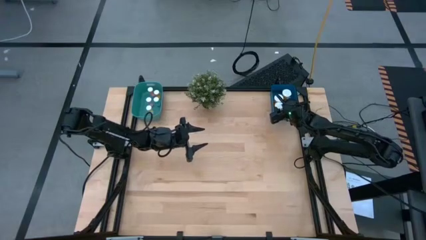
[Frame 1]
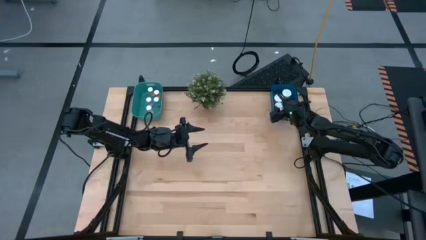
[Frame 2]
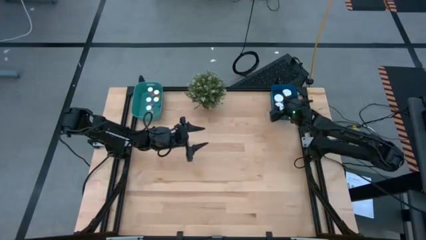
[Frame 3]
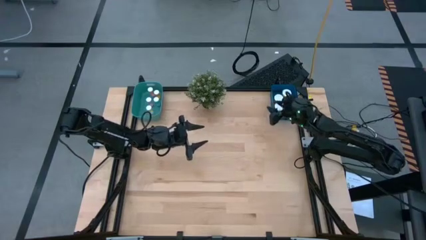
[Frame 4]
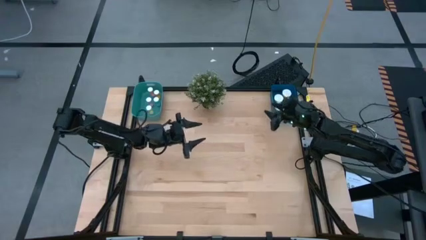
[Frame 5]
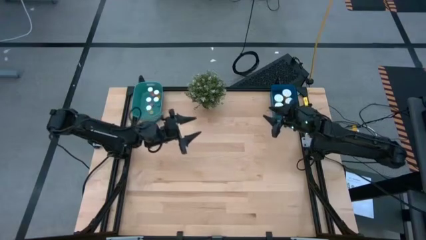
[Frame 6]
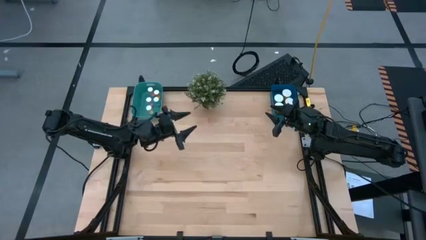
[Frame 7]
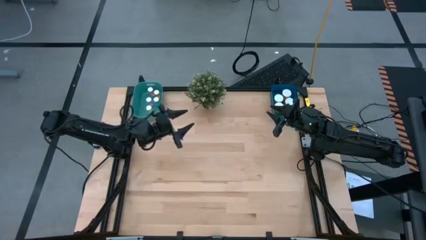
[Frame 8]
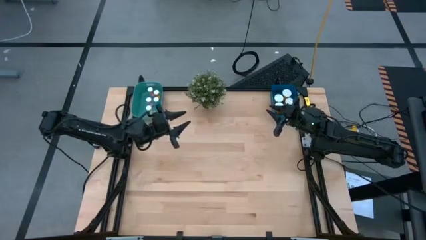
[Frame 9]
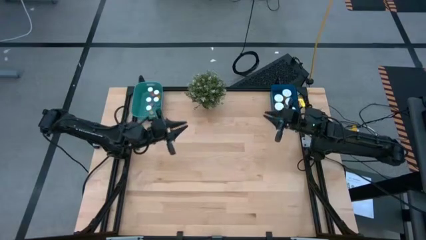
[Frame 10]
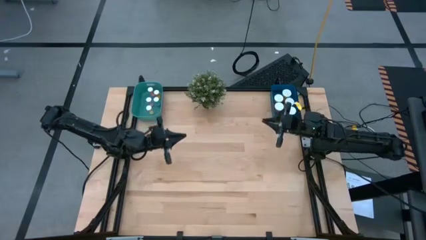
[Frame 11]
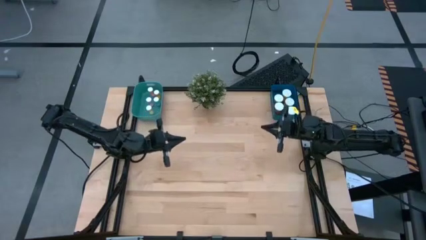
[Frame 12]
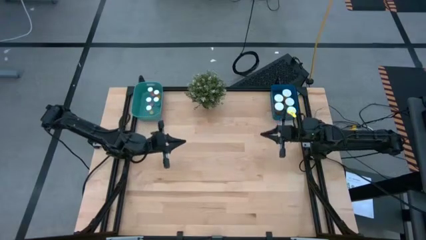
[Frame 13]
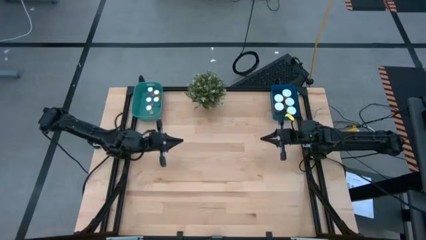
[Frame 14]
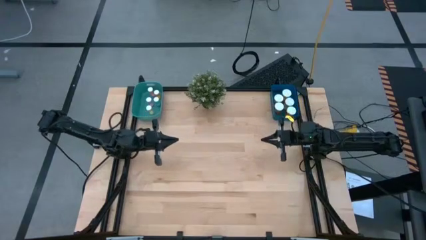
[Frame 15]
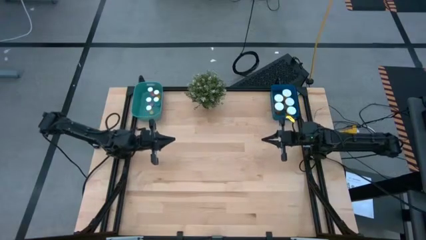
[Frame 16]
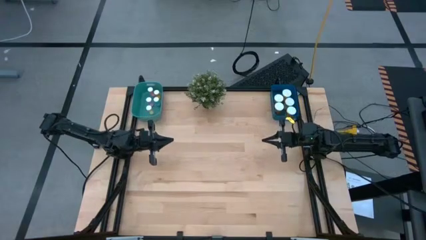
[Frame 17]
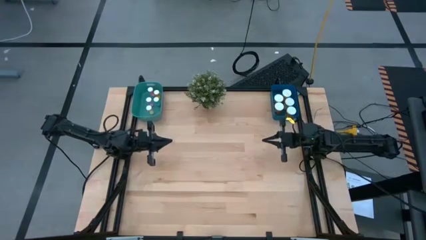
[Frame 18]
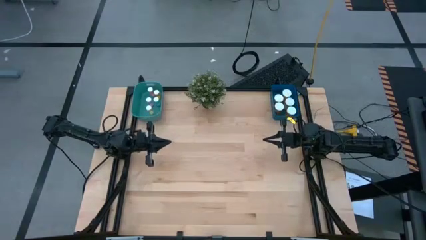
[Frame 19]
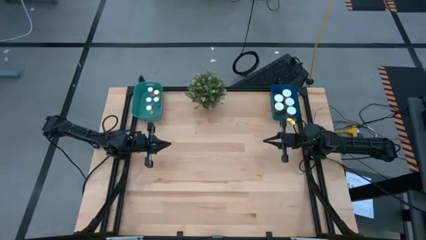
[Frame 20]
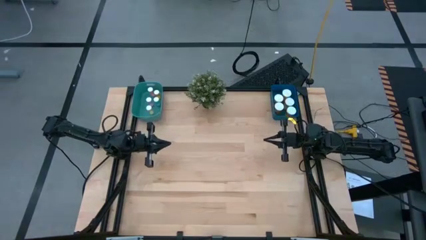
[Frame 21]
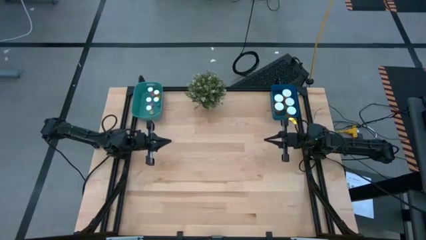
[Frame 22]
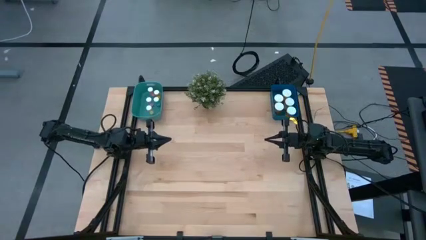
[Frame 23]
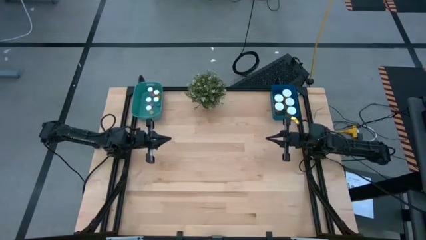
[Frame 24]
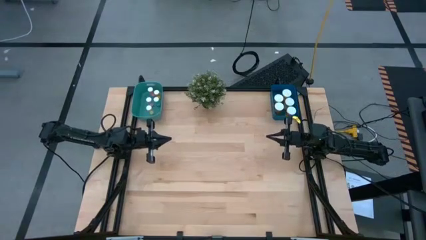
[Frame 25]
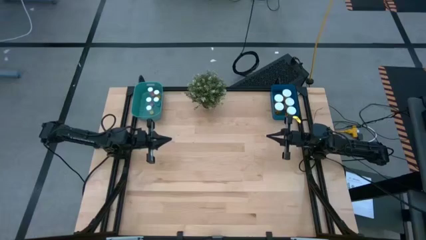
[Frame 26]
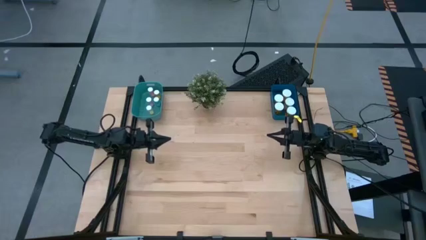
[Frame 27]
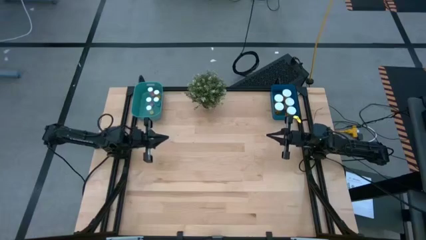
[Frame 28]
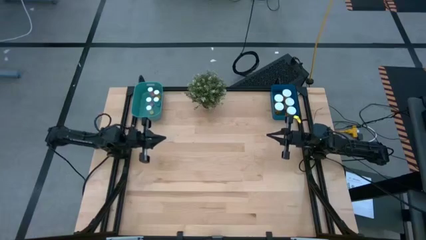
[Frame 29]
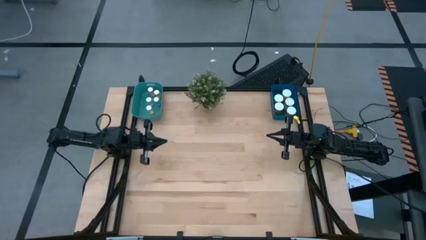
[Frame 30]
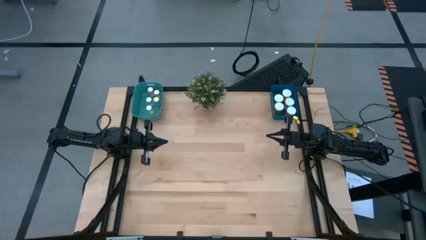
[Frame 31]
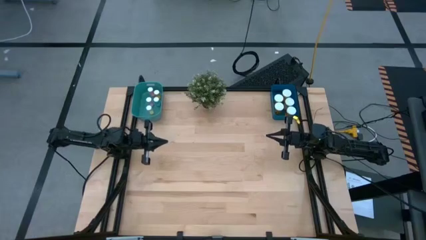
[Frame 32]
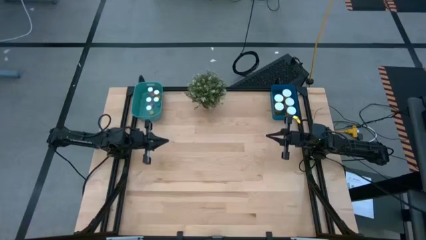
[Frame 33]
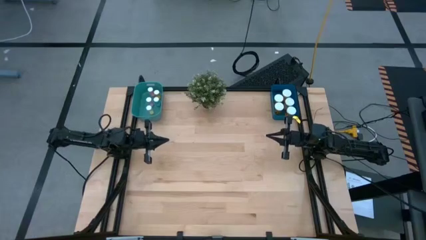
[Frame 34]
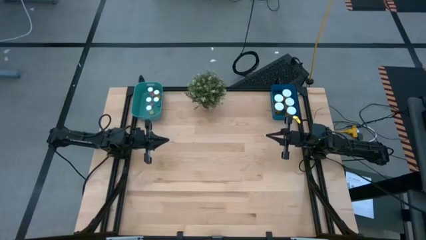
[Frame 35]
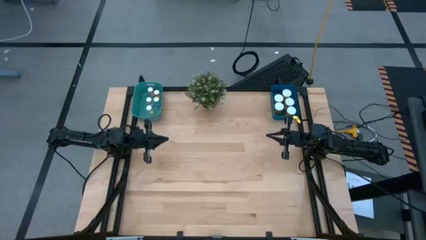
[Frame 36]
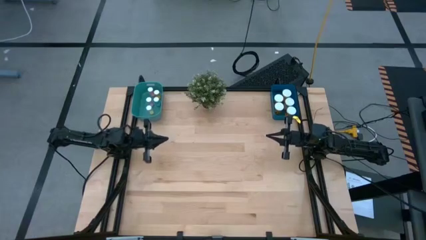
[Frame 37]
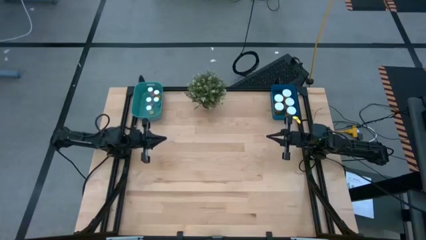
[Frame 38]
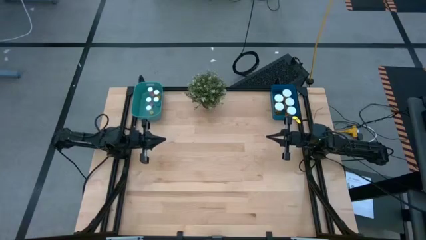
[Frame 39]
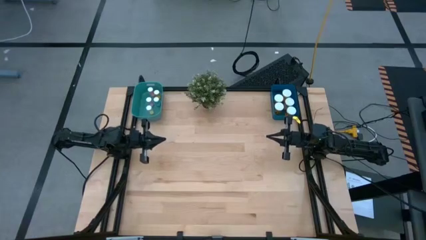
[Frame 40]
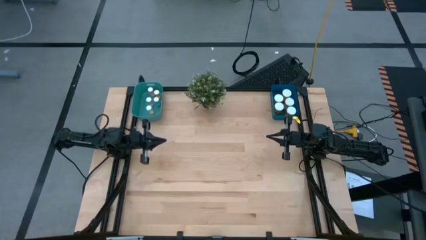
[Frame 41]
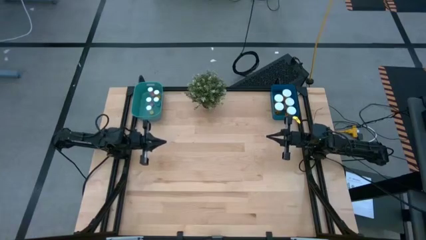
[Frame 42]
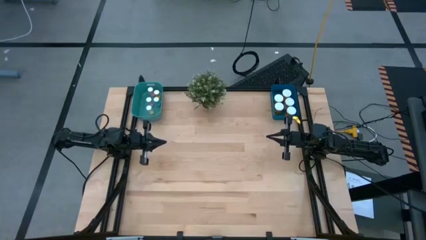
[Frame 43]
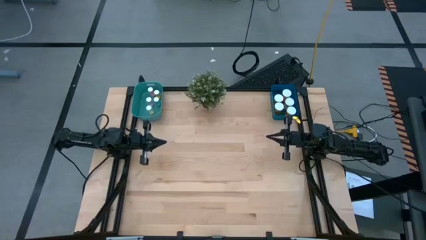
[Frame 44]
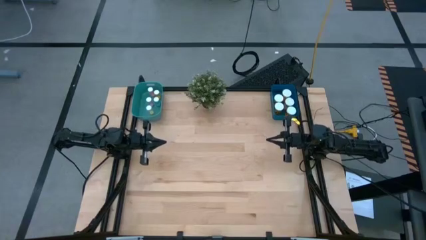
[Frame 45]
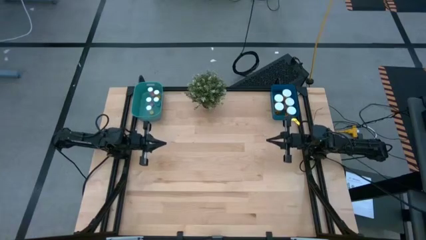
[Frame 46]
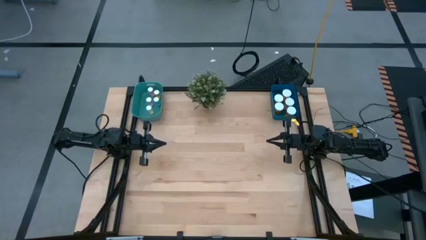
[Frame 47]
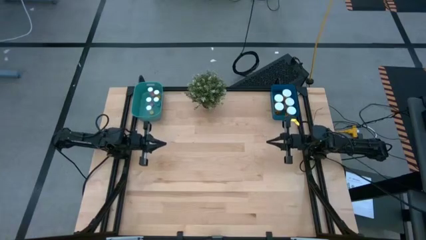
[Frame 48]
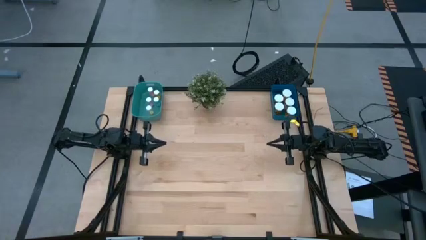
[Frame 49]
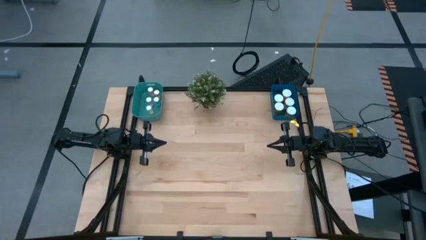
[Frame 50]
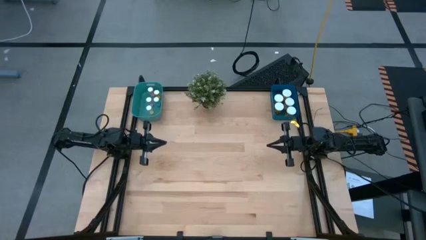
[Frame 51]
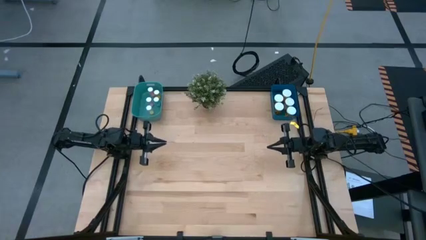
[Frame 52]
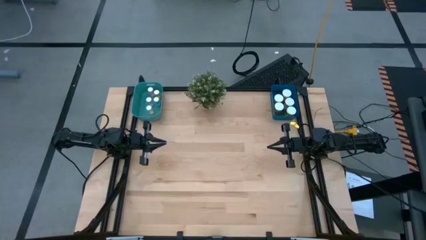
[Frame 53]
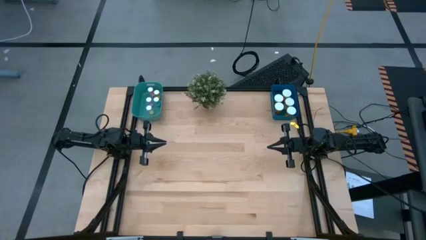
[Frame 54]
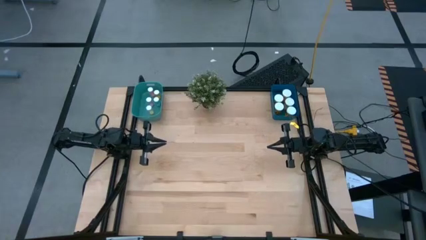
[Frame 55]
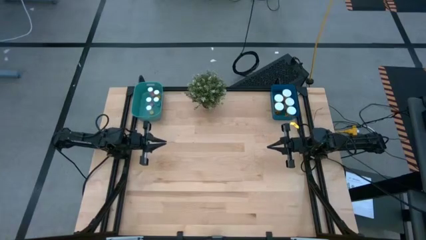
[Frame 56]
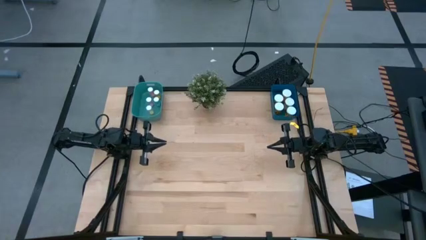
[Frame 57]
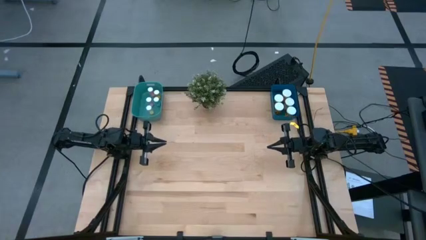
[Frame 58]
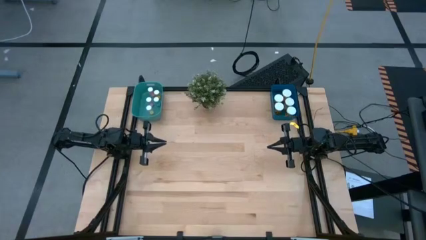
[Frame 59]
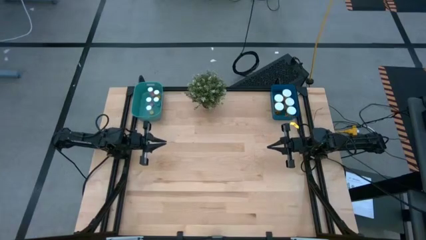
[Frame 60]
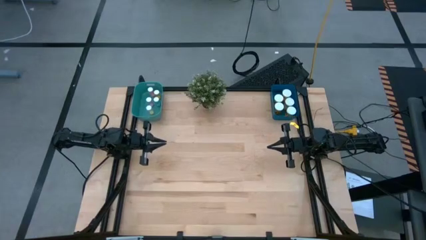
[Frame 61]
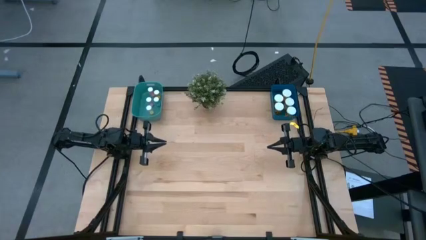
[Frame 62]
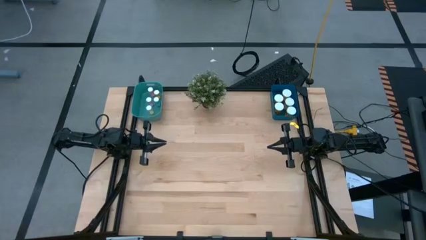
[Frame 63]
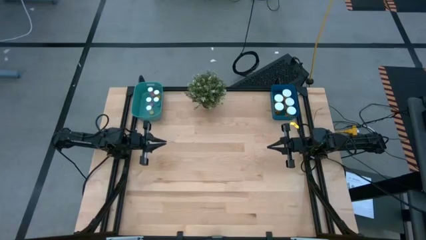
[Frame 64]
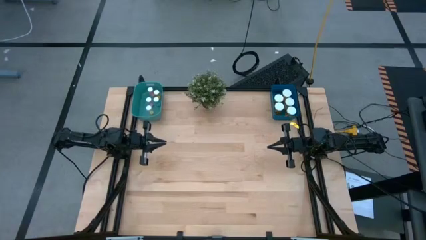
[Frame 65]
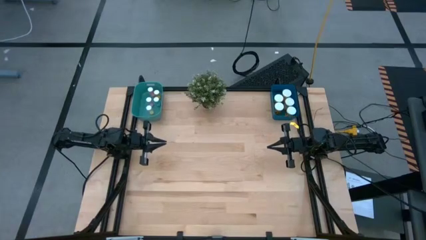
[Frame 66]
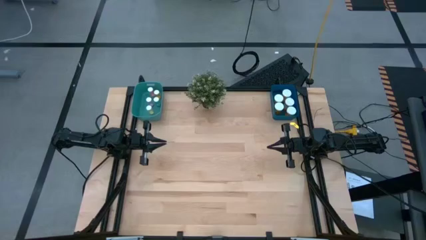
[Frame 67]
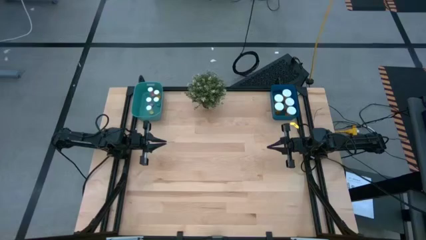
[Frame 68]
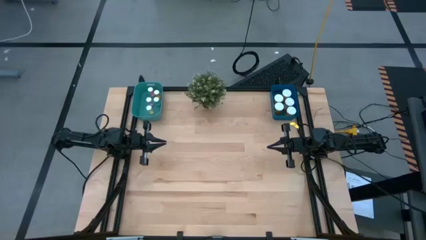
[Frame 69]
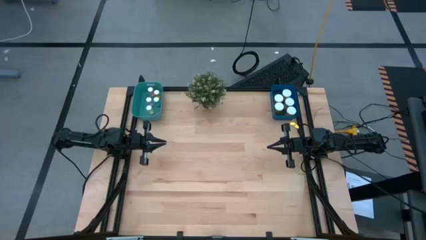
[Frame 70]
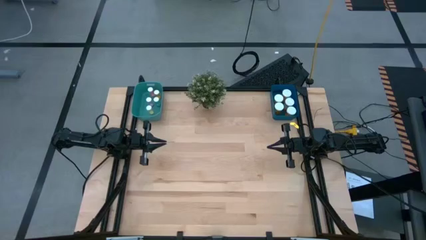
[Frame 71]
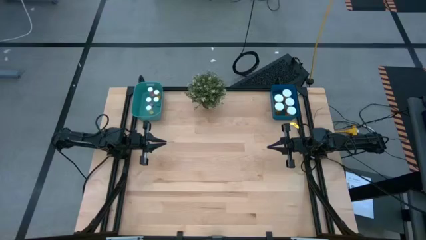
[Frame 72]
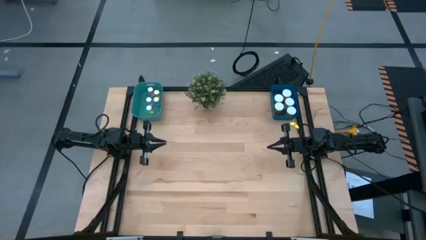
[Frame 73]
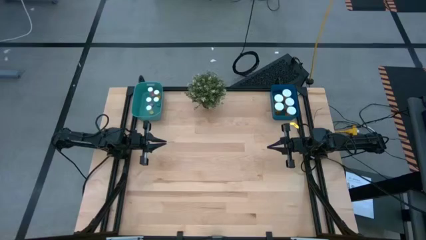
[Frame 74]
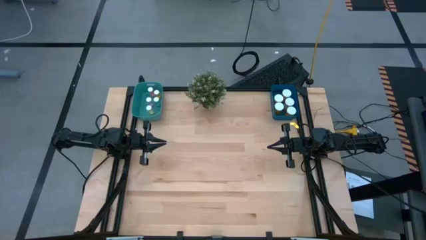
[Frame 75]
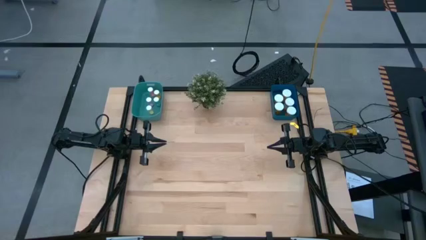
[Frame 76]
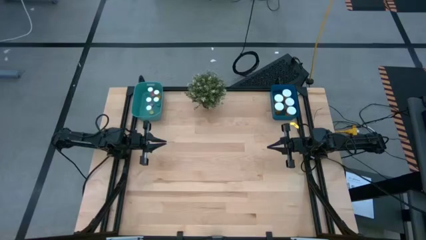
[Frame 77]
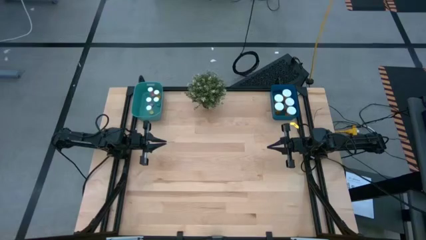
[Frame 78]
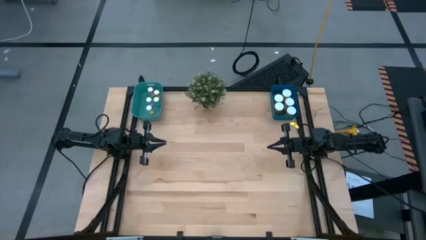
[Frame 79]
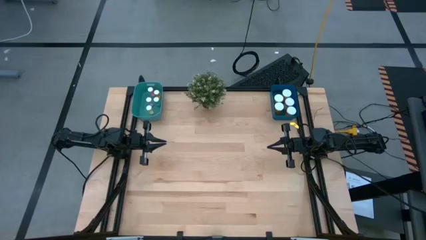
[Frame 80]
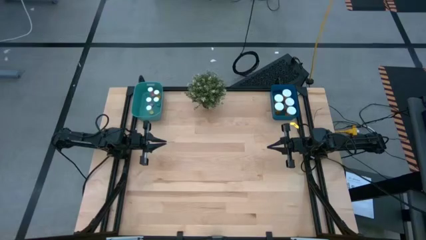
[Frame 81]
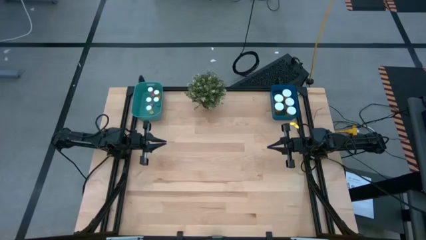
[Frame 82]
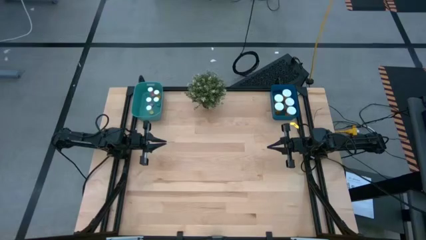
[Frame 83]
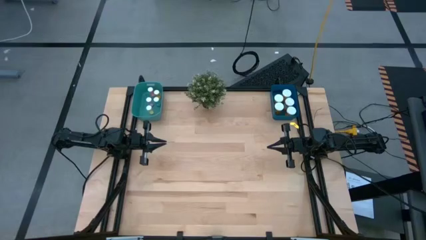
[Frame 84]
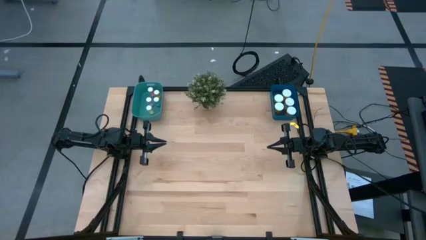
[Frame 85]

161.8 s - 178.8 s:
Task: Pick and place medicine bottles into bin by pill shape (circle, oval)
Return to Home Position
